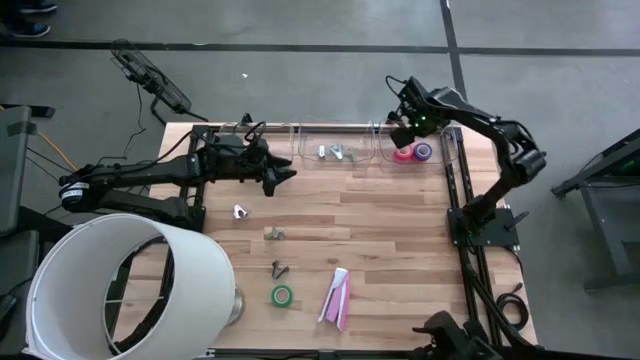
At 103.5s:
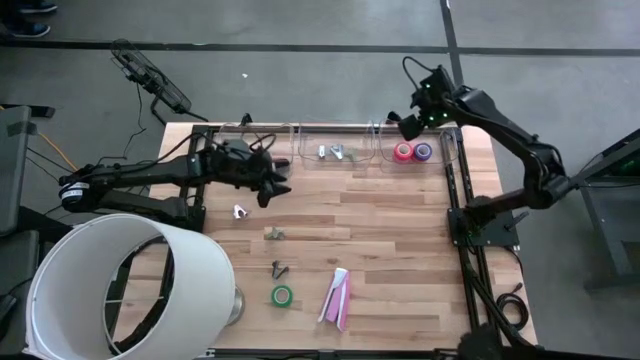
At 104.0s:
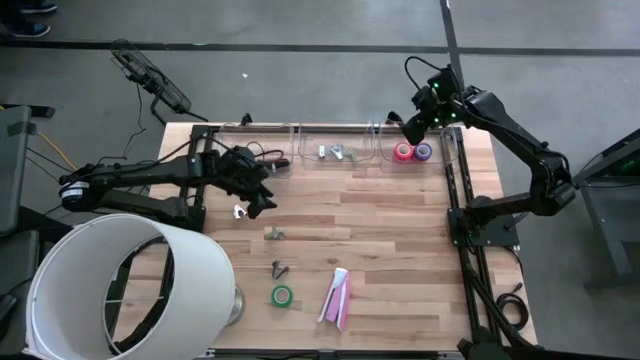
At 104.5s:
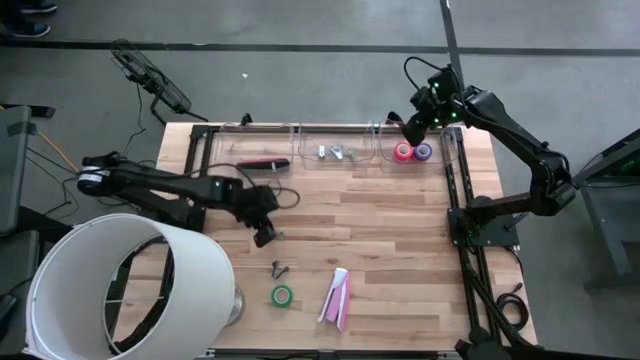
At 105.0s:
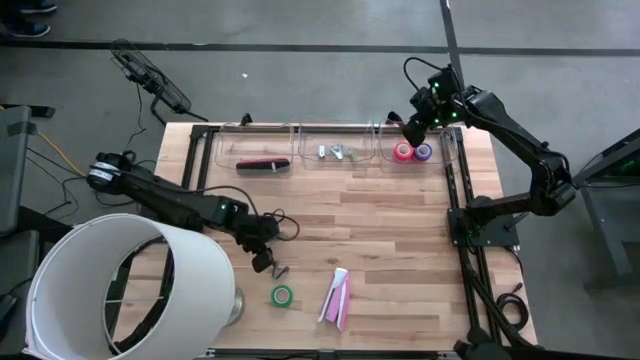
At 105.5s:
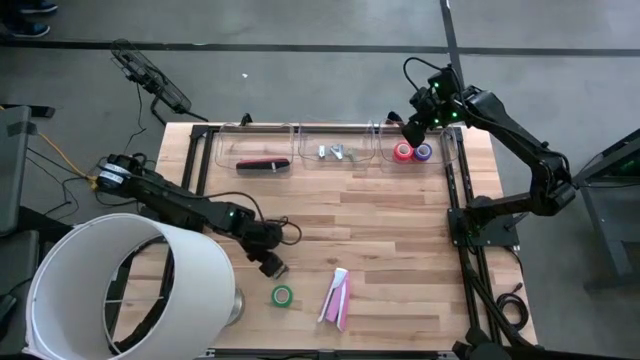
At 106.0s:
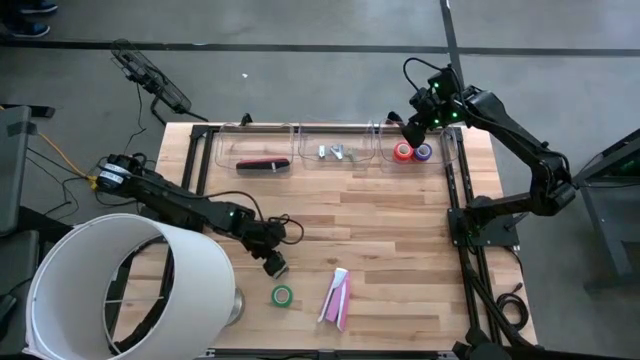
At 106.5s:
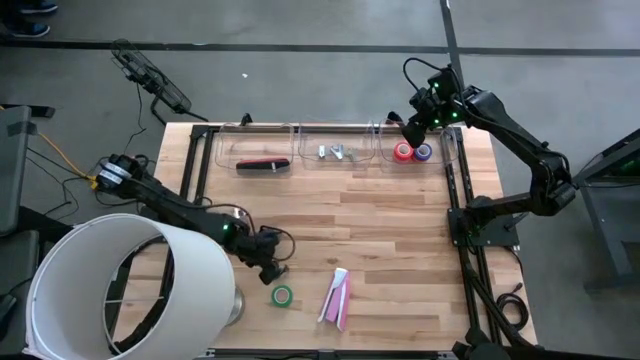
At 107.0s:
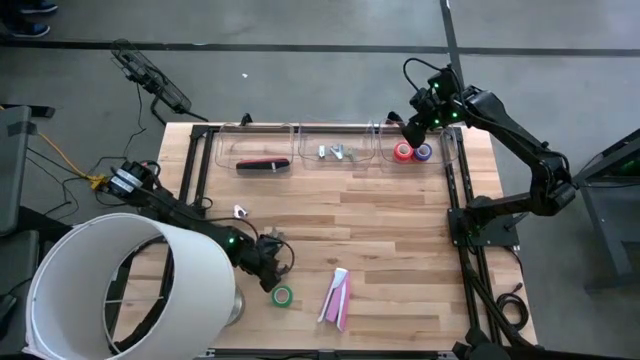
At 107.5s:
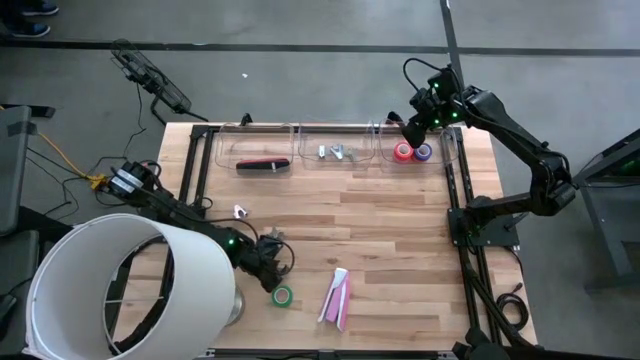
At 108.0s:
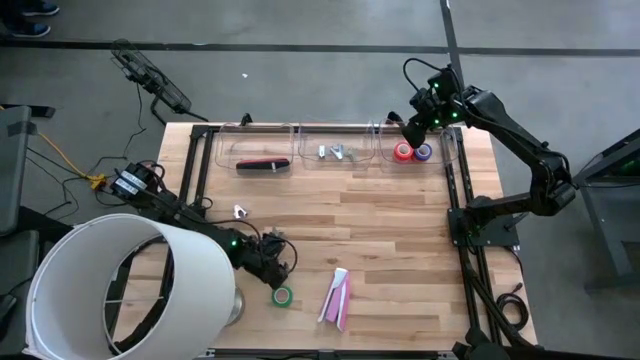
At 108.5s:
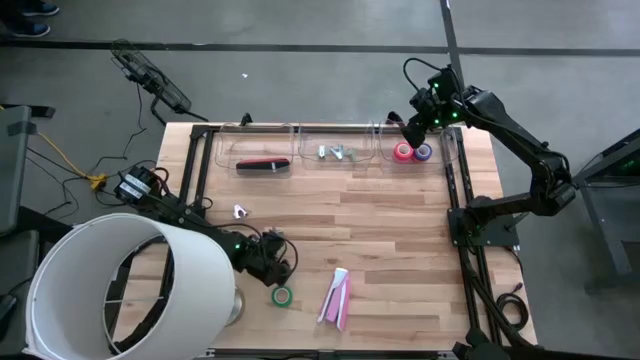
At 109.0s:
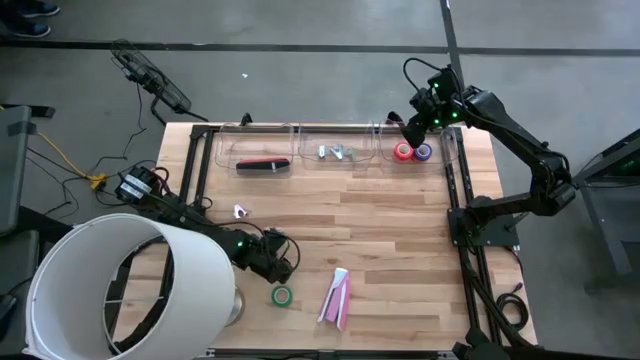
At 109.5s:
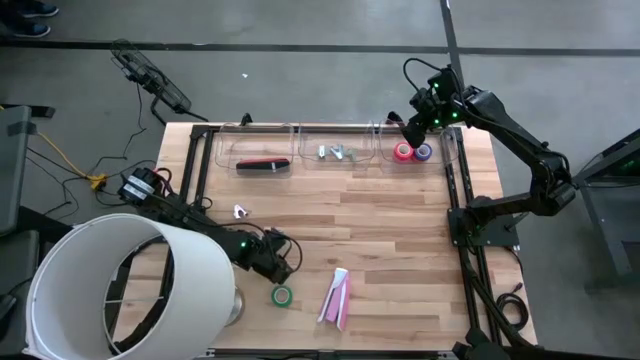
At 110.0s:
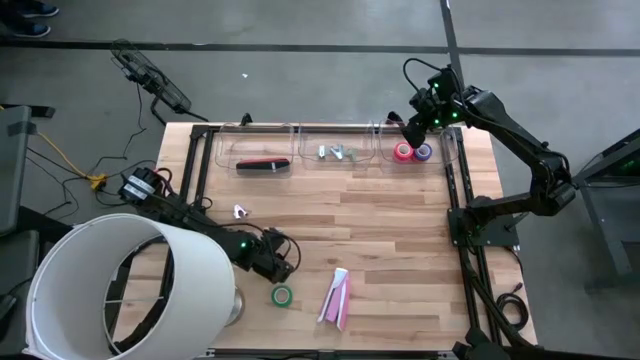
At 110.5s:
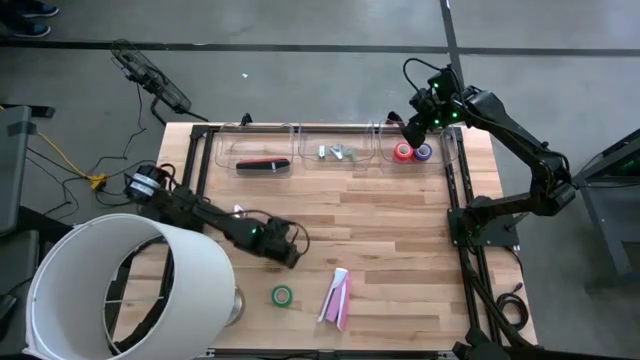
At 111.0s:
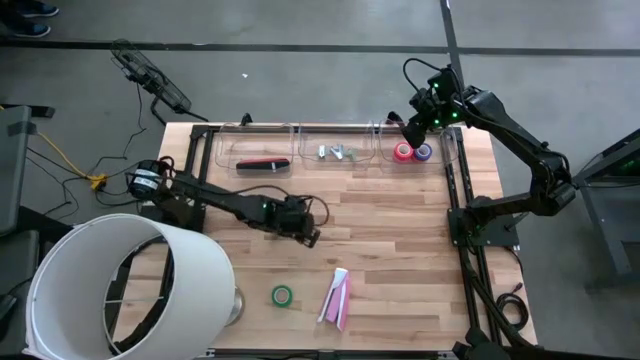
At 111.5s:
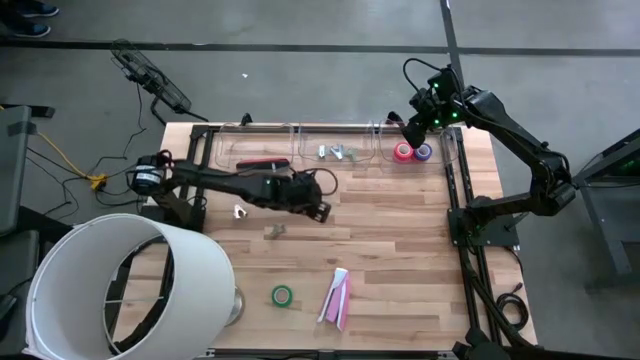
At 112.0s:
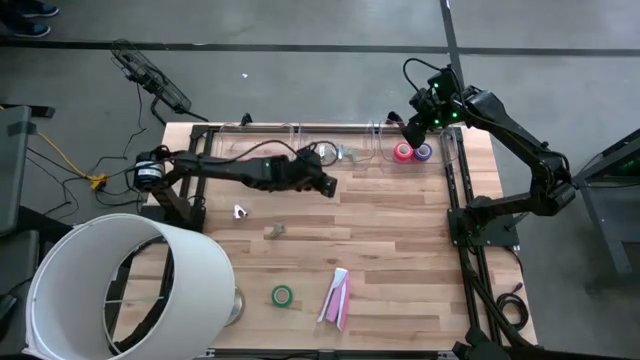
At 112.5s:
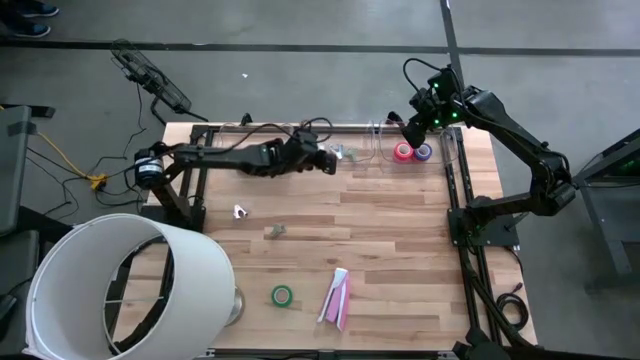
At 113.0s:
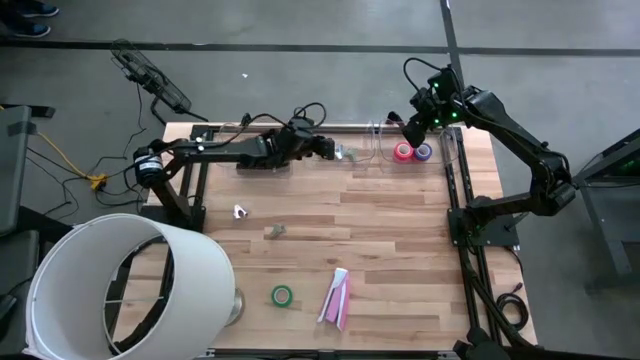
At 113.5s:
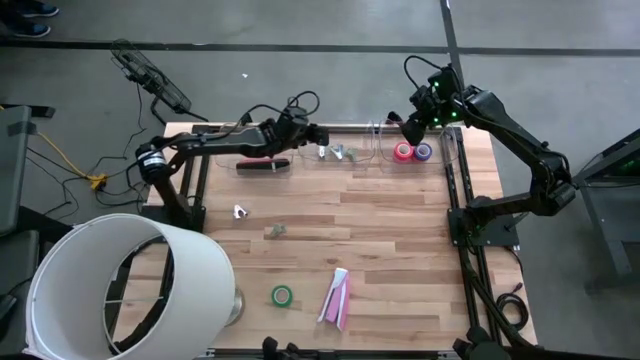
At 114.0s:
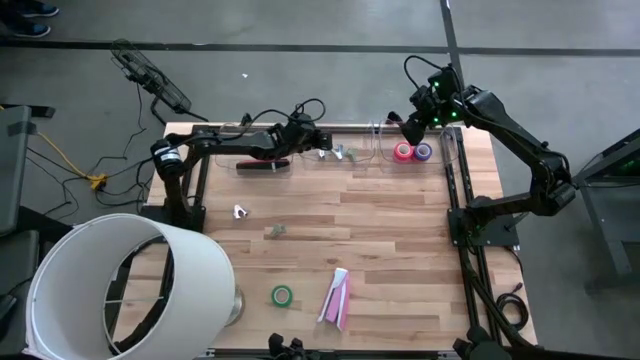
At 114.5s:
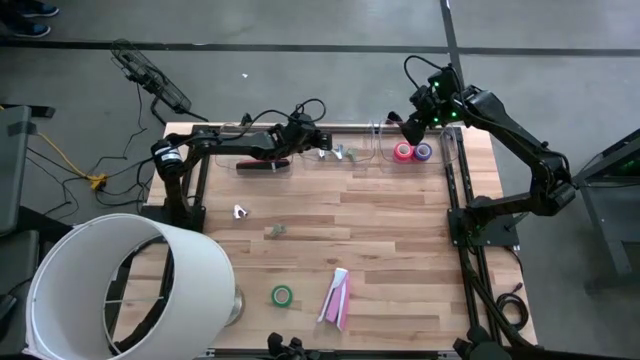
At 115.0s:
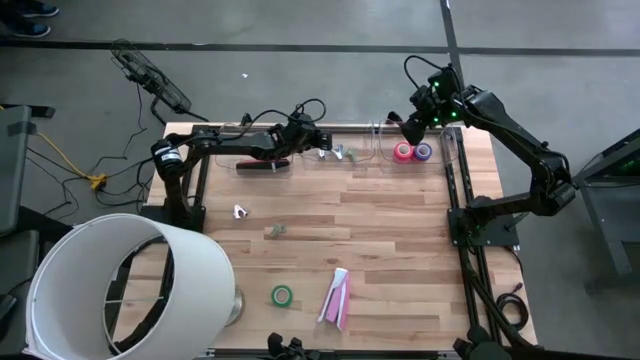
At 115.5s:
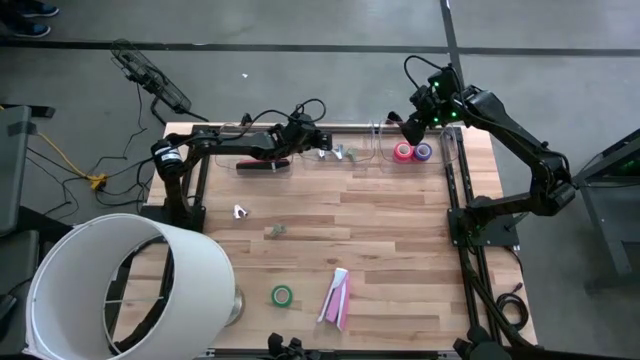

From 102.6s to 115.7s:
Task: Pick and place Stapler, Stapler remover, tape
Put the black stapler remover into the middle transparent bin

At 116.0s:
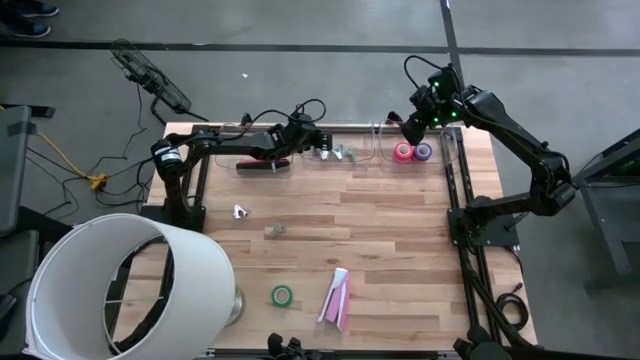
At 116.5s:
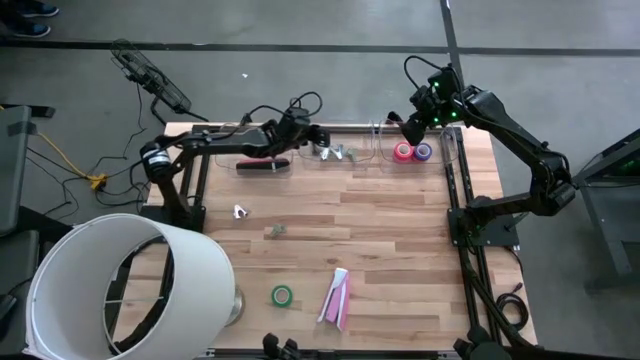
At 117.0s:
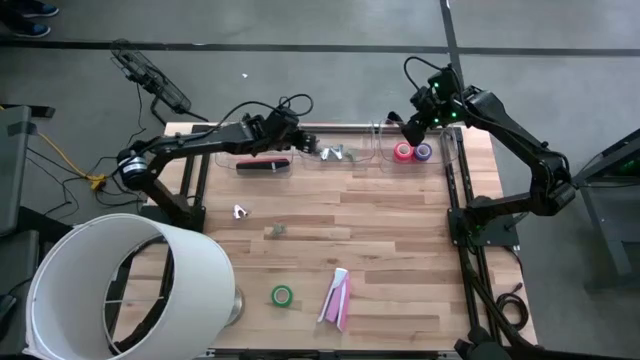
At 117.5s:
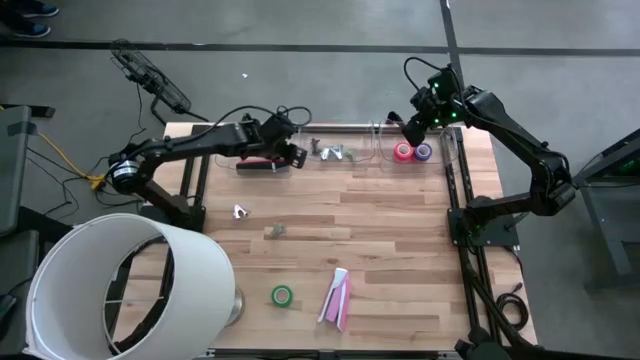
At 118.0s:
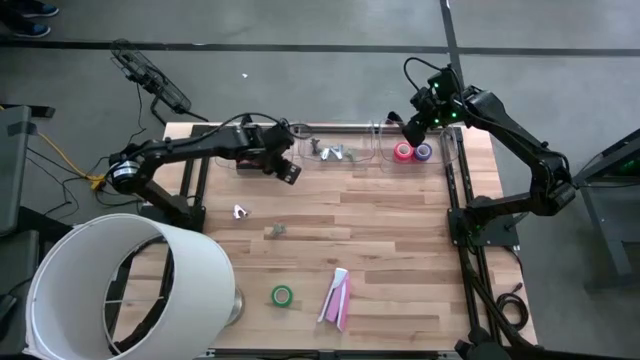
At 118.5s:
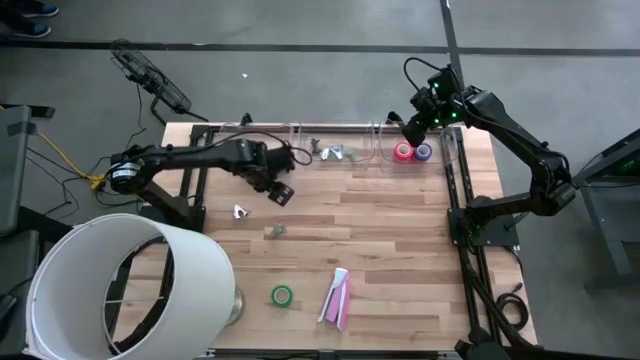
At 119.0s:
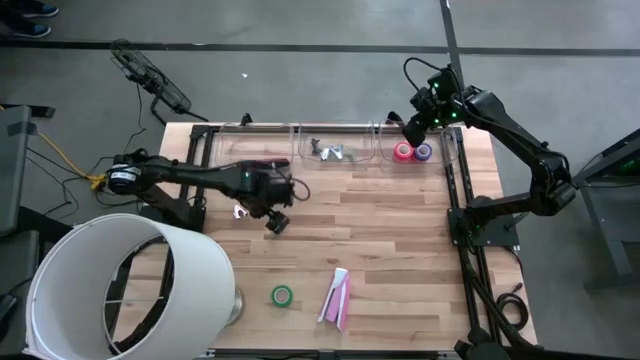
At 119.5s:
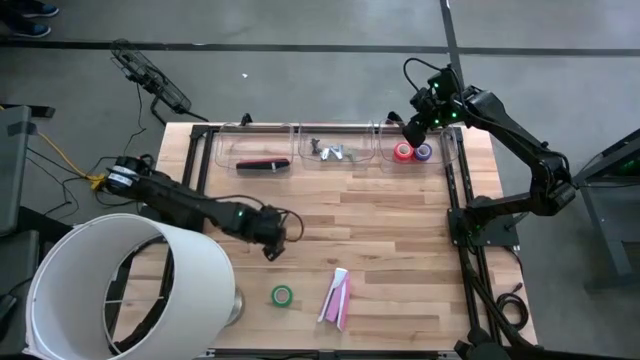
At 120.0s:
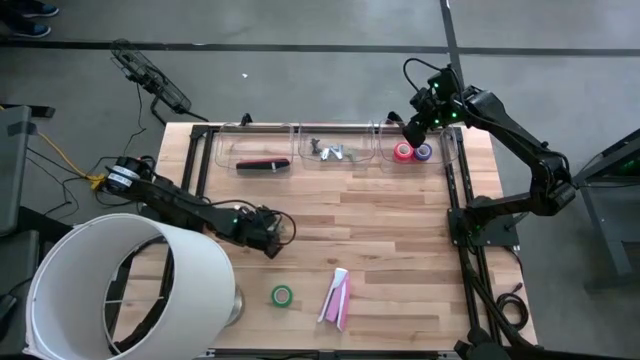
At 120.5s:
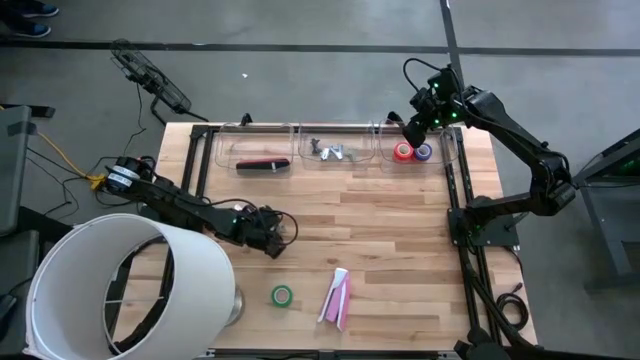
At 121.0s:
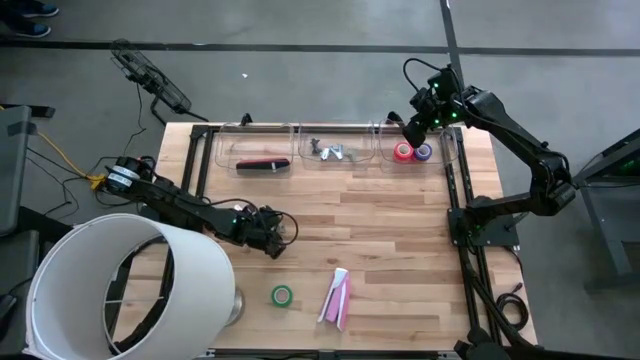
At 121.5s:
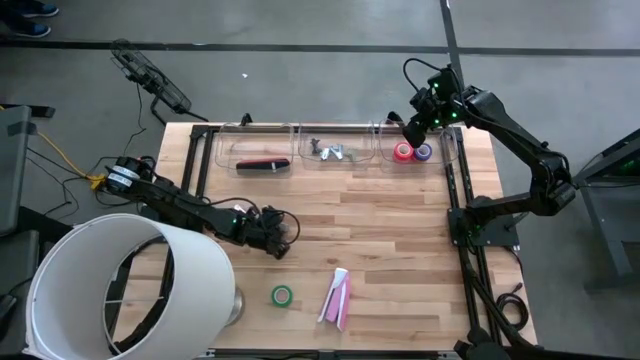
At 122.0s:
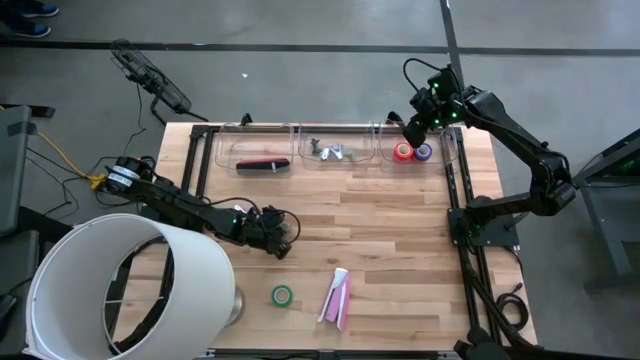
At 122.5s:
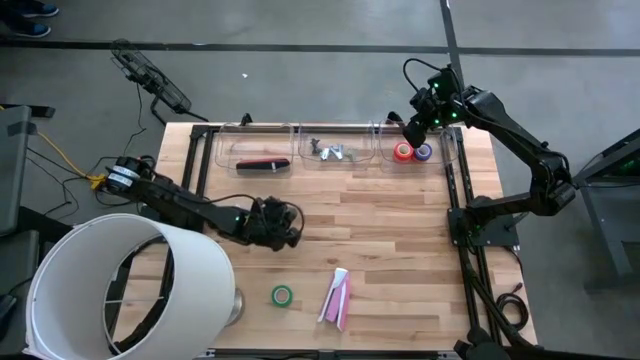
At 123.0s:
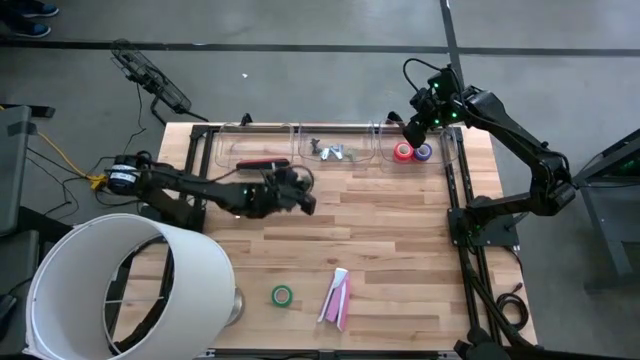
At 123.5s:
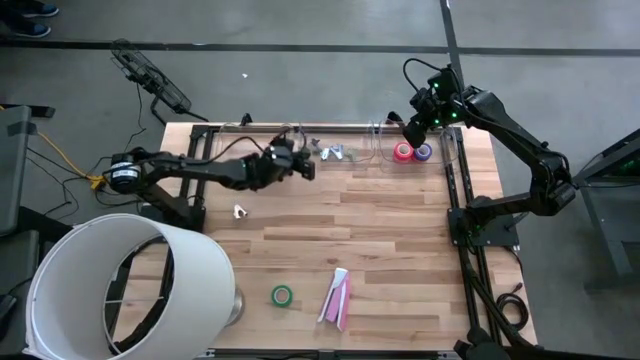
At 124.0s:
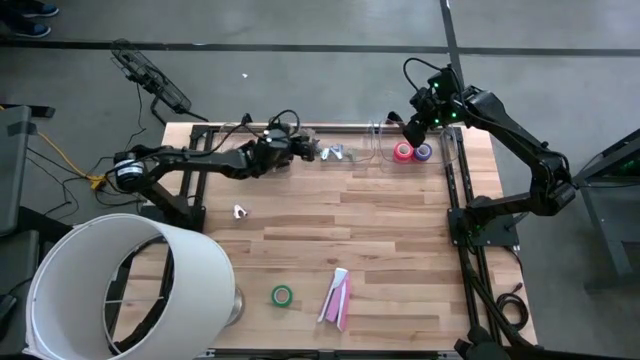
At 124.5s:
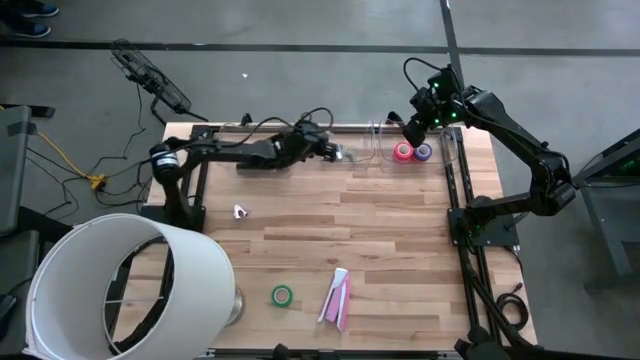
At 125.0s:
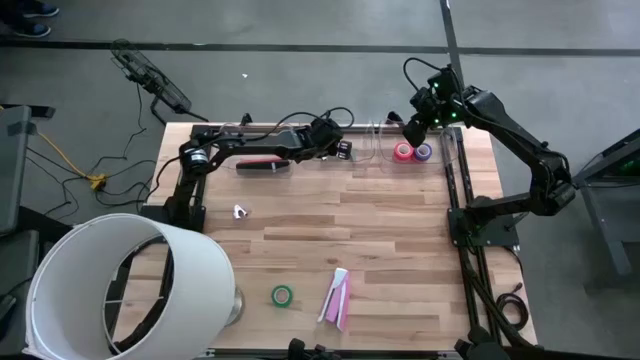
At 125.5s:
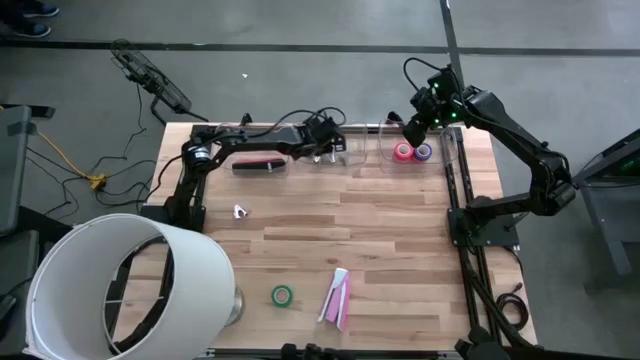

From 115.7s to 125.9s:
Put the gray stapler remover into the middle transparent bin
